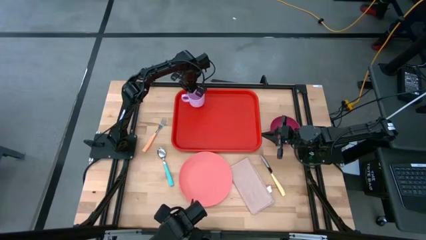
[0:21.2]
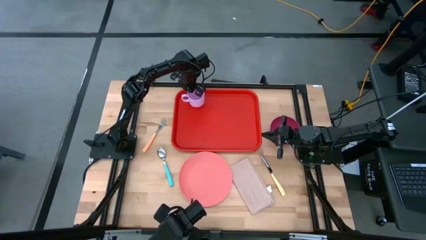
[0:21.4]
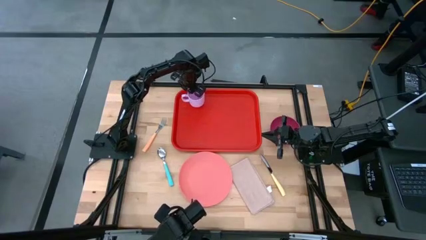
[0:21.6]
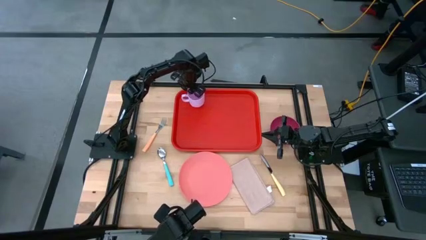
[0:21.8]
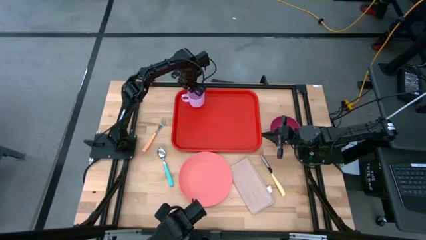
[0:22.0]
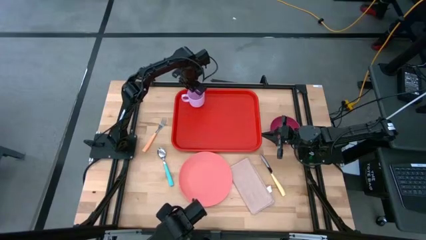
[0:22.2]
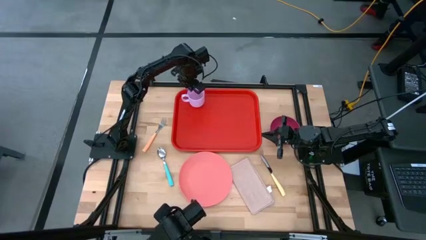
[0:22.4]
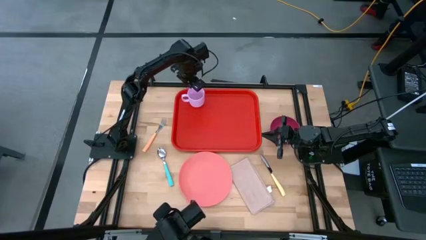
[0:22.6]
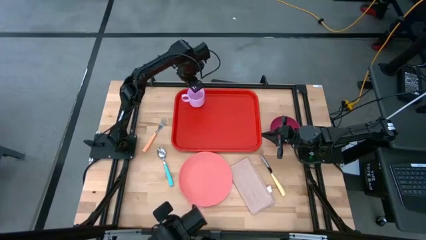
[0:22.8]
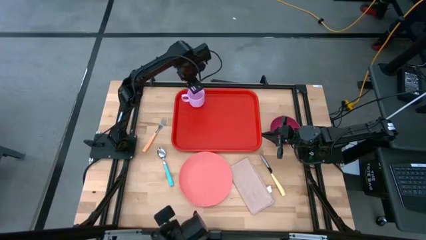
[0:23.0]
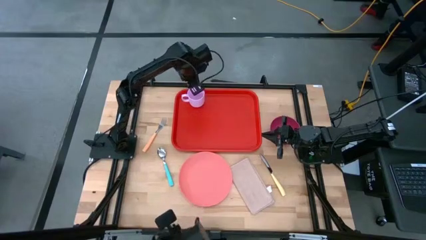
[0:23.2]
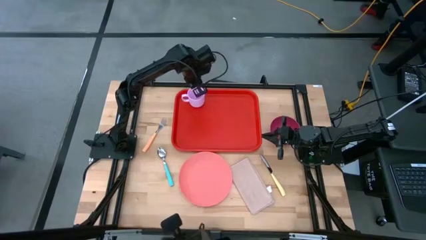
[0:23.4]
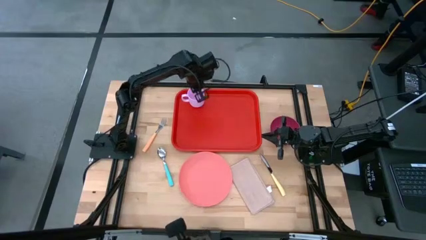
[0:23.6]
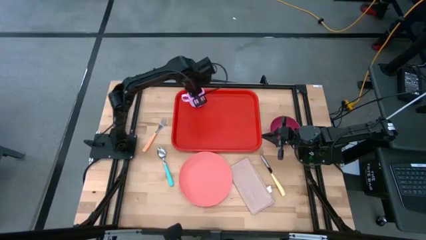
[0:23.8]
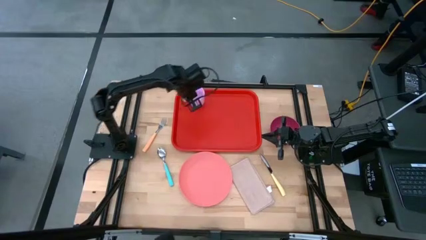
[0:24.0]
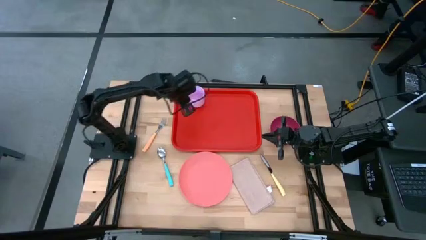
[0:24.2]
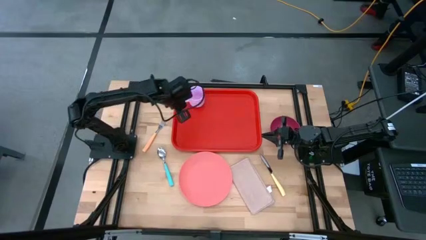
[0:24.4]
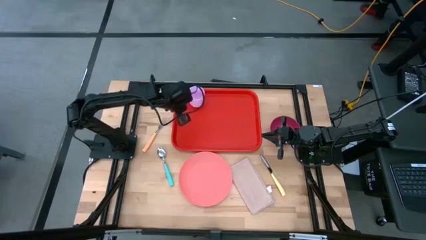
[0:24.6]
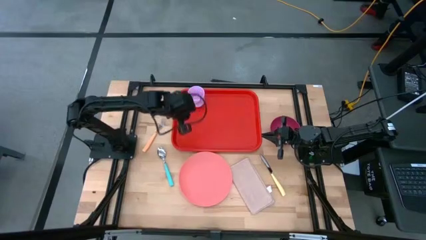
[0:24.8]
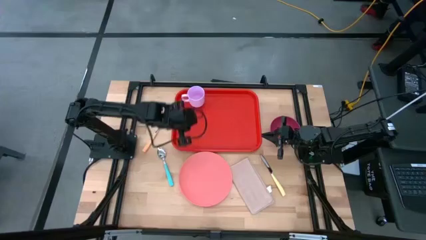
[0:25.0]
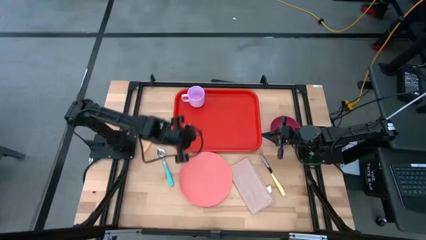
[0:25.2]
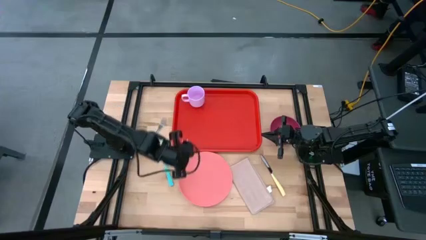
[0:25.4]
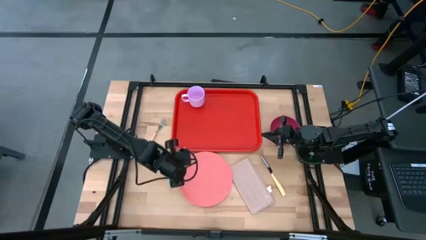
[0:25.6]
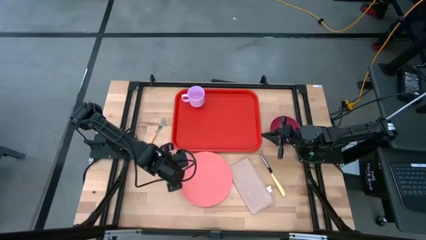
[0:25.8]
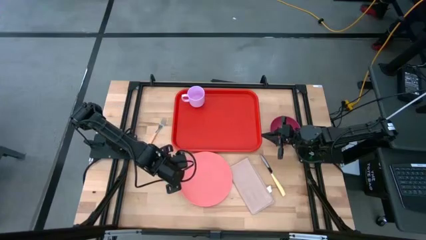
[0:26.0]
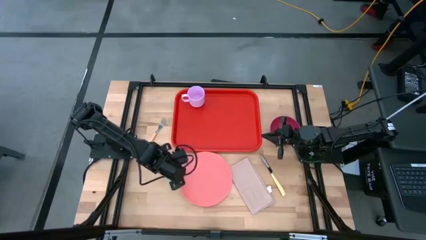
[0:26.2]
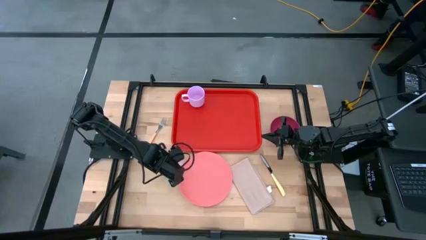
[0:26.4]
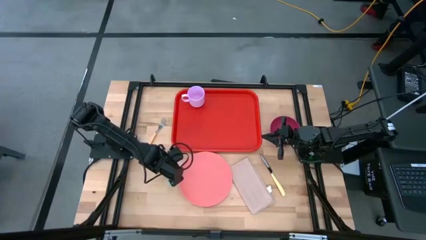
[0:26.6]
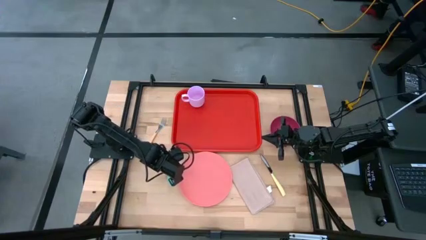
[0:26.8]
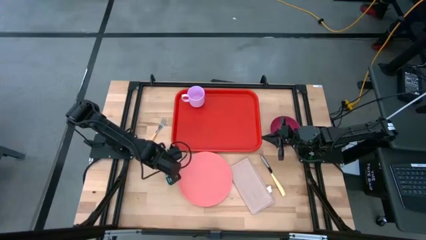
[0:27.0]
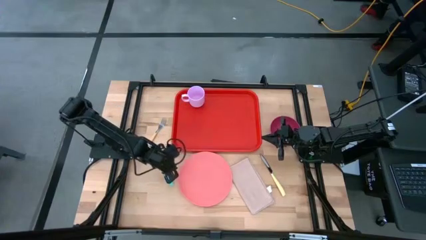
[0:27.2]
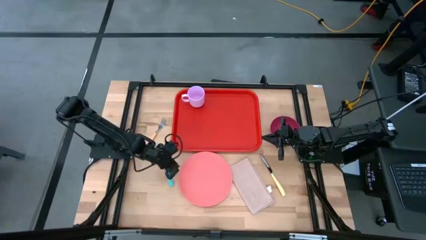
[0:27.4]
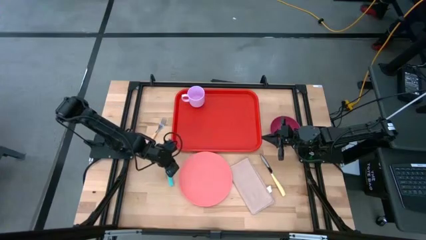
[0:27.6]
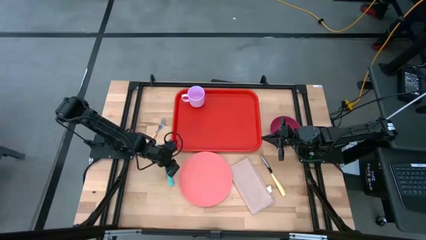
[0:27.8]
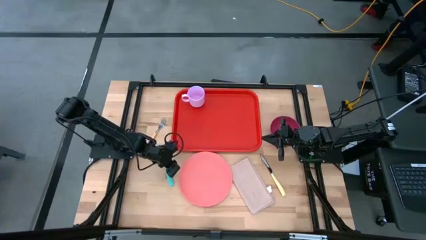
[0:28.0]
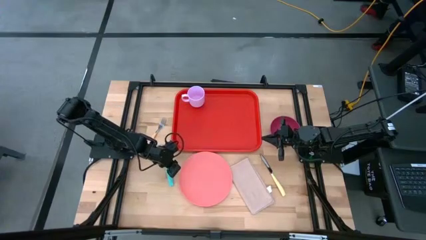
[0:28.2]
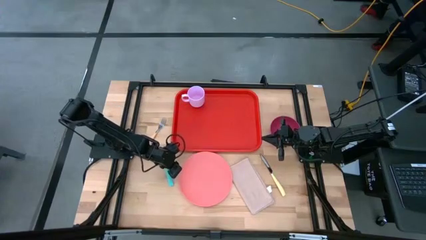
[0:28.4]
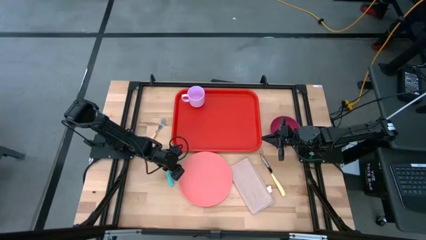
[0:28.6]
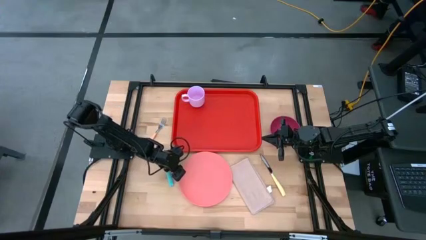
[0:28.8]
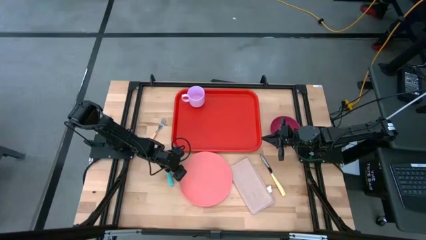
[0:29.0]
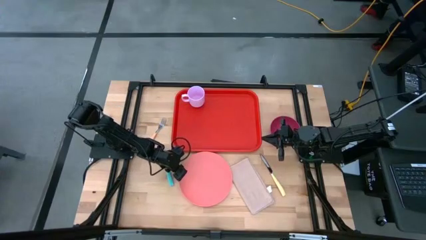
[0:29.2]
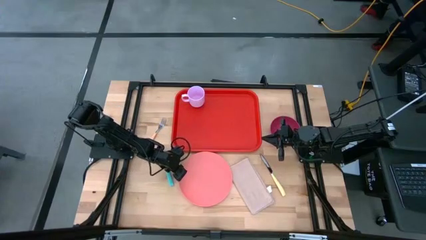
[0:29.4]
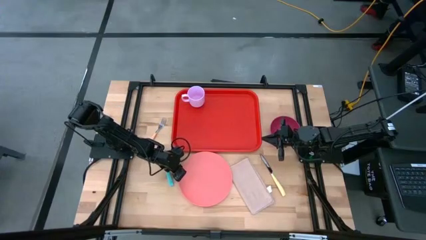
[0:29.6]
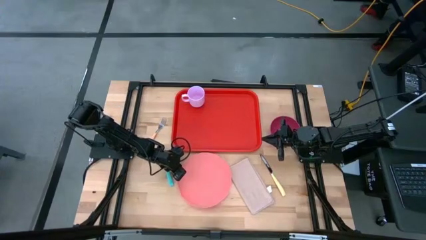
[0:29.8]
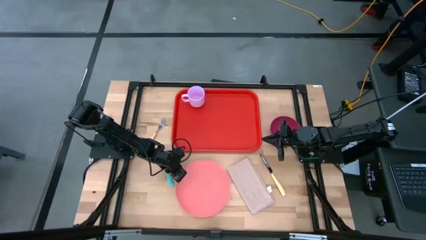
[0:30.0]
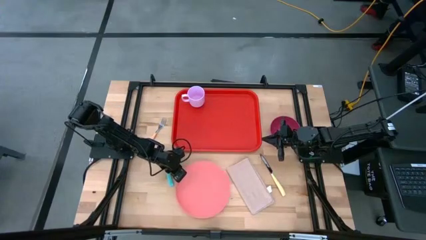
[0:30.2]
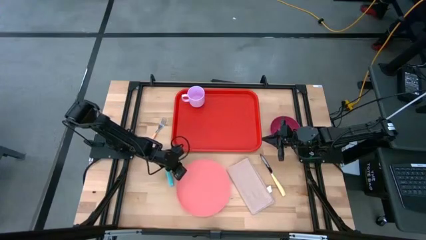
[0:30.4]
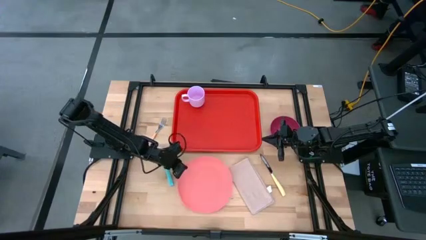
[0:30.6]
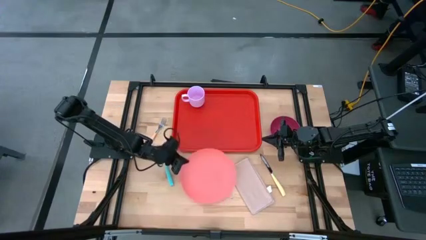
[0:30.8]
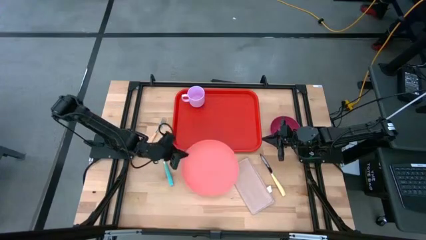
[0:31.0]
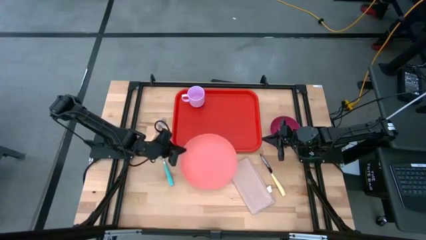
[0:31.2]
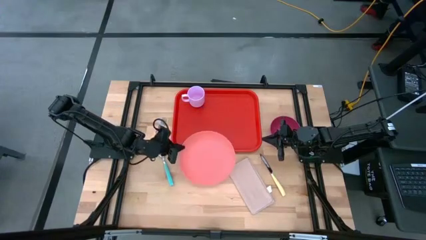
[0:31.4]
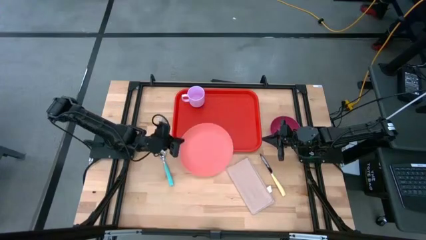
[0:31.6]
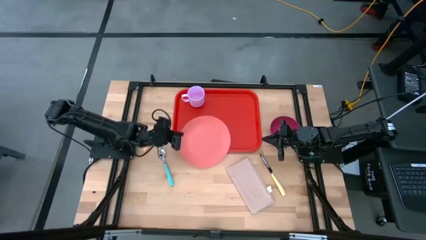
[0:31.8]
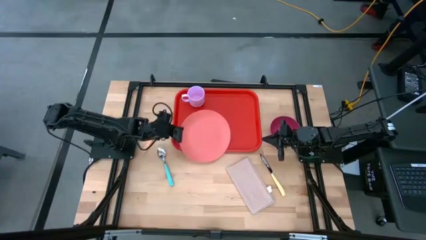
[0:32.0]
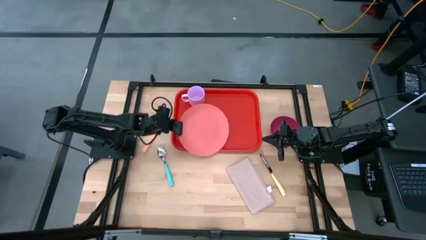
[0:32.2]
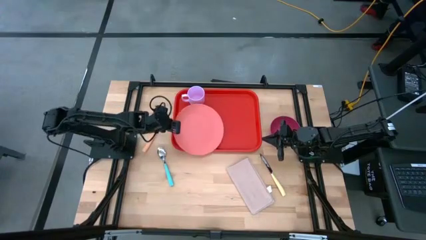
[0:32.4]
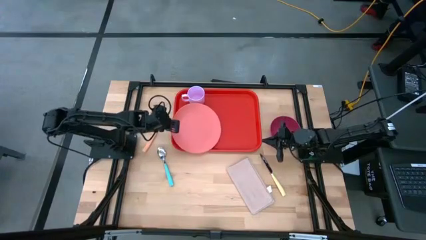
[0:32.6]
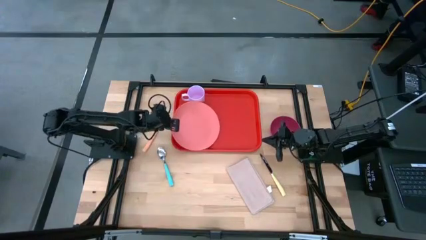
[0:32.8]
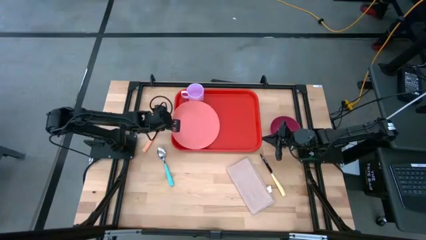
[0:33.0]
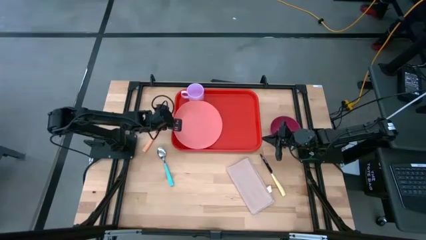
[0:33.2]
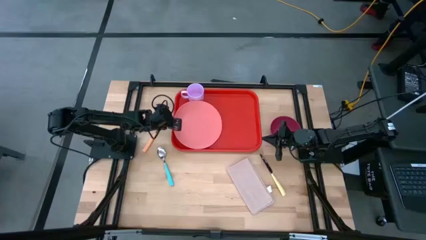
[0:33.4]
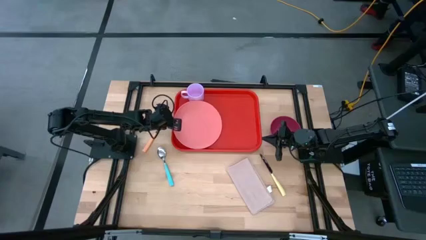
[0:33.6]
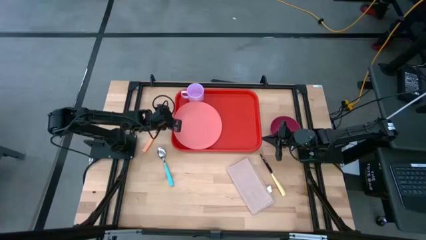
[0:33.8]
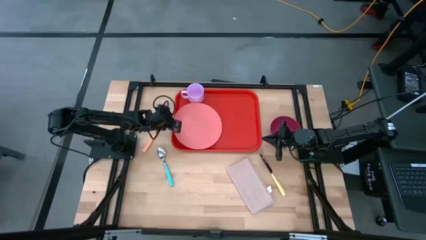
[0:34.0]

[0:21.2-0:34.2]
Task: Set up tray
Put the light pink plate on the red tray

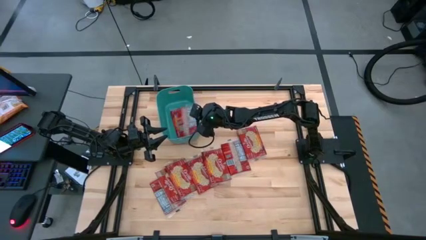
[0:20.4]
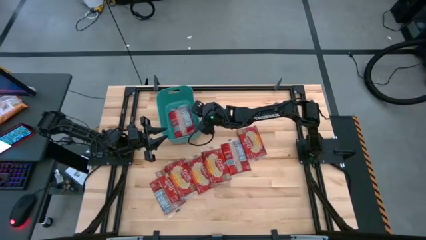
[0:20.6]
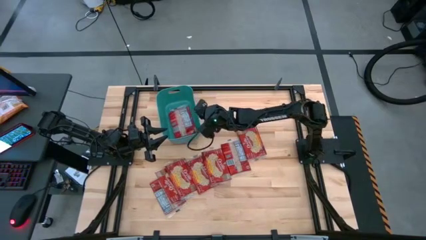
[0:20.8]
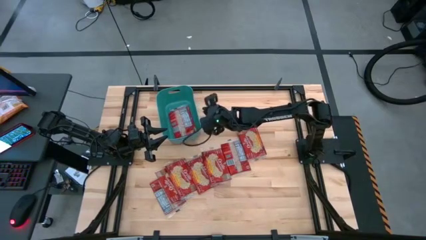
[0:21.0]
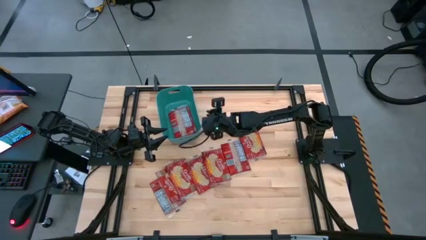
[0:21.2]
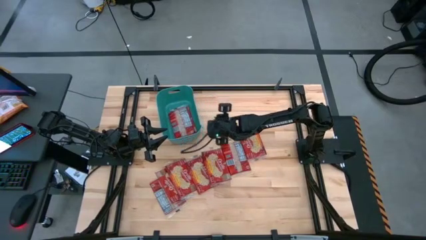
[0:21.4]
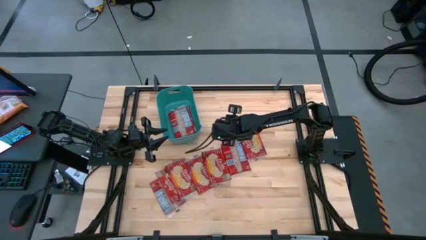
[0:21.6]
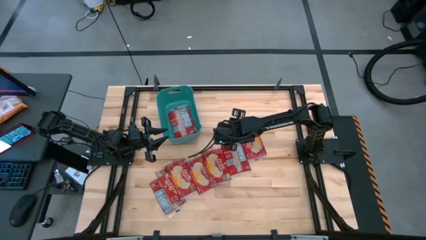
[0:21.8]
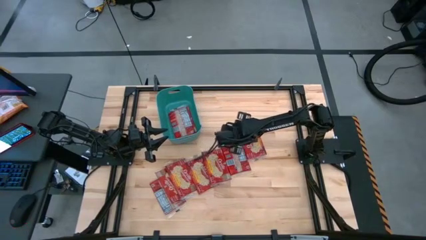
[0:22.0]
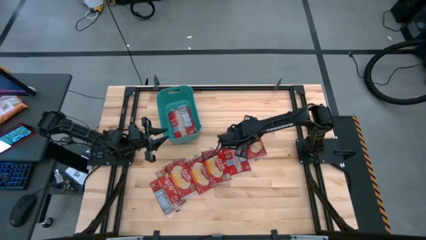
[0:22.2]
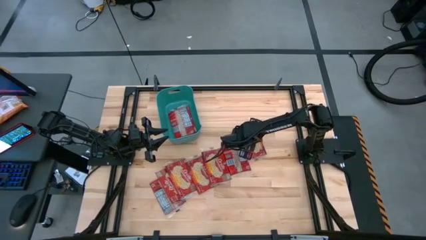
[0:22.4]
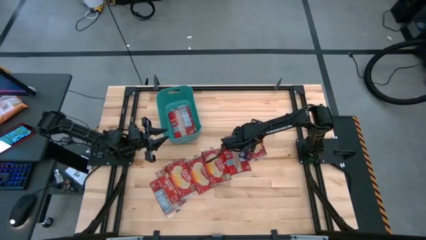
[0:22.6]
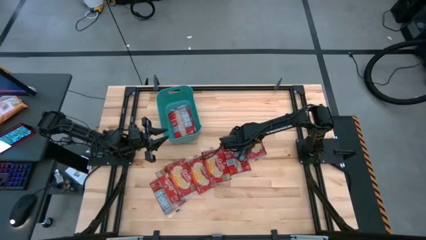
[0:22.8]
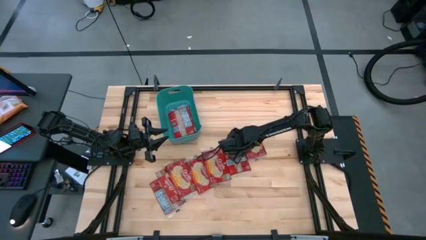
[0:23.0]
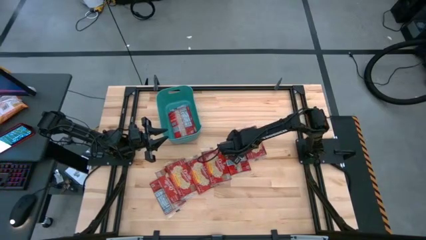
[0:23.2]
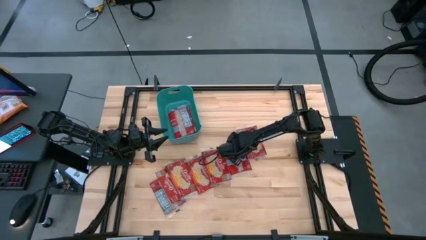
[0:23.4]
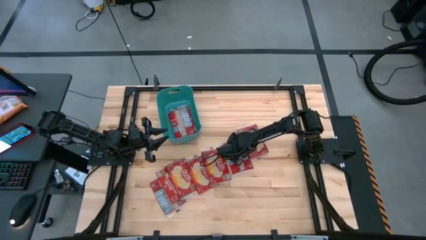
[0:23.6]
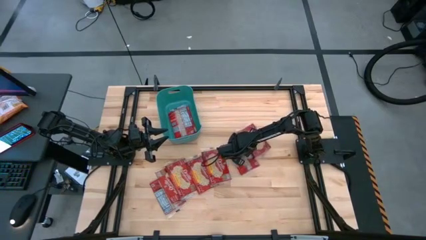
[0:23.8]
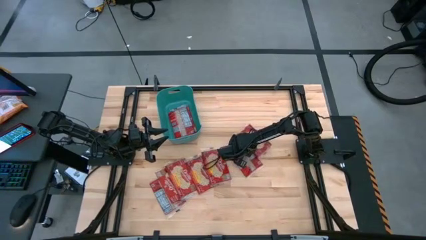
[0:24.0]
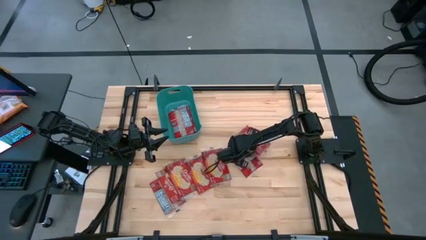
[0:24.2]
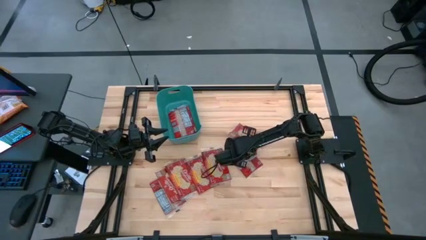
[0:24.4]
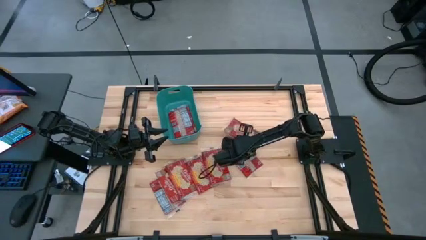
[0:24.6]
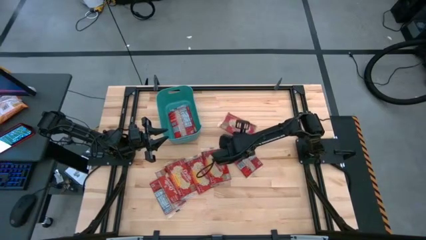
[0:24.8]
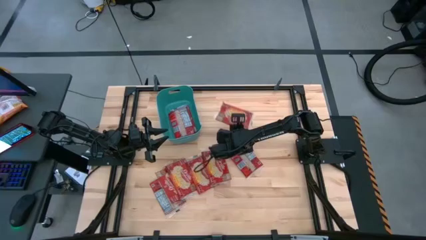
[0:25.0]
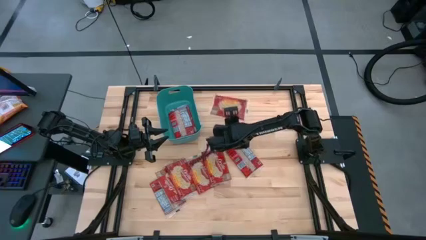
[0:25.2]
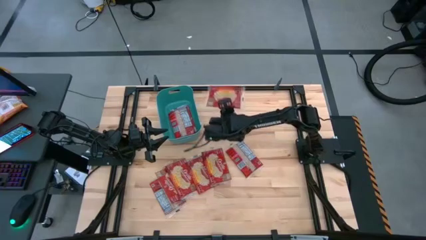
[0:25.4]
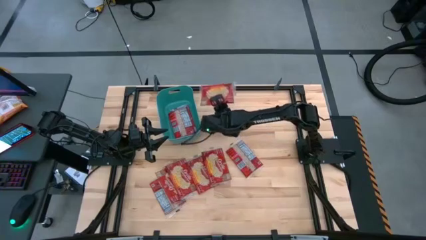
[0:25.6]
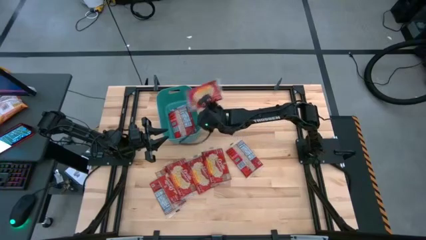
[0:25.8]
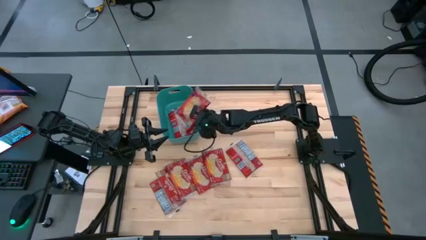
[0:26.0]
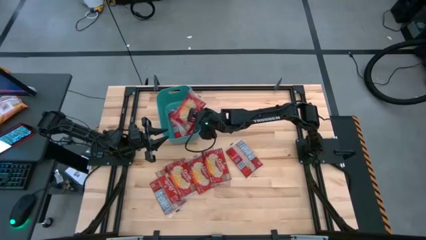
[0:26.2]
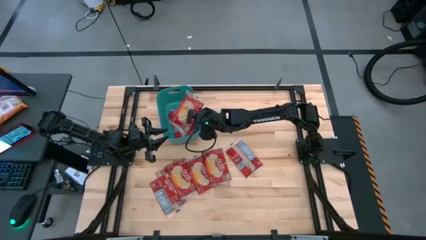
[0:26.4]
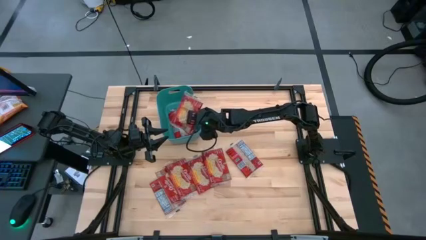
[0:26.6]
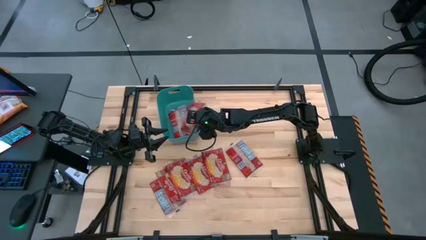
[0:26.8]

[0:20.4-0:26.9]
Task: Sort popcorn bags into baskets
Put the red popcorn bag into the green bin
